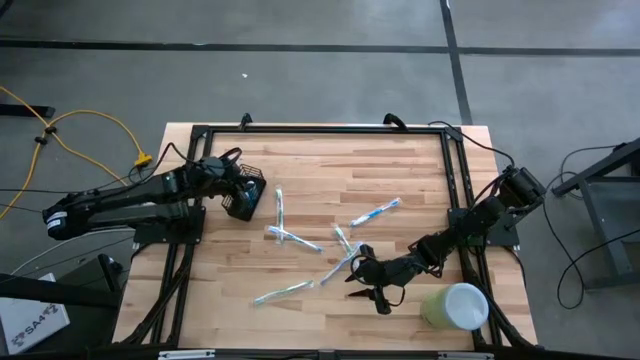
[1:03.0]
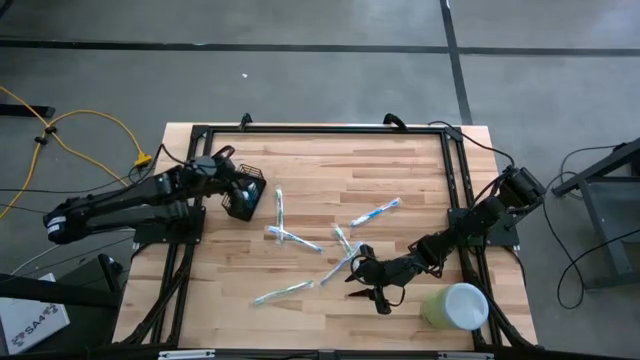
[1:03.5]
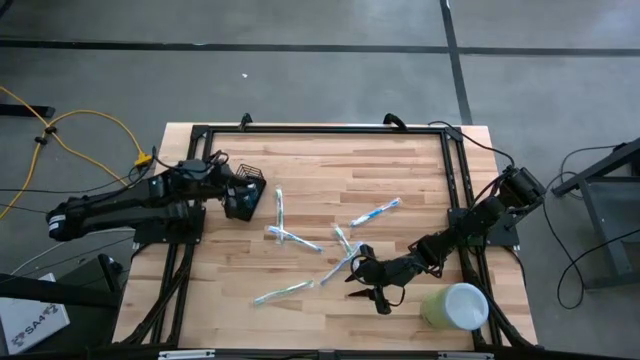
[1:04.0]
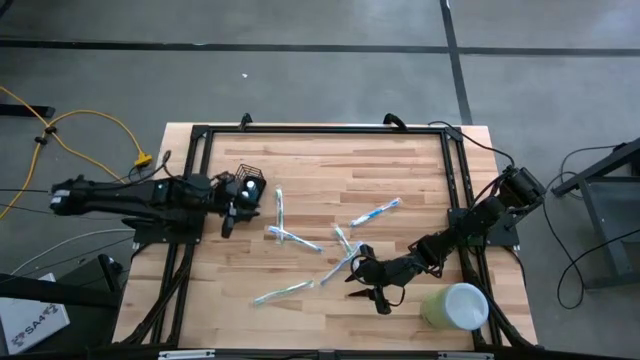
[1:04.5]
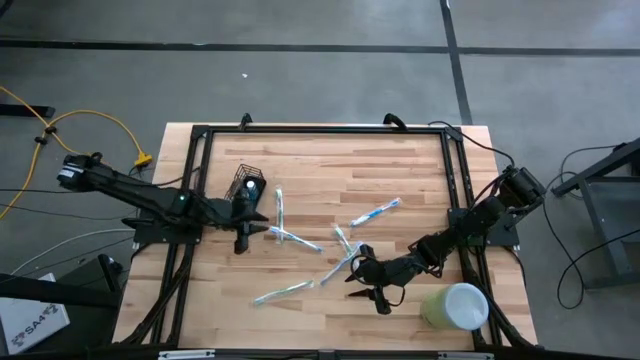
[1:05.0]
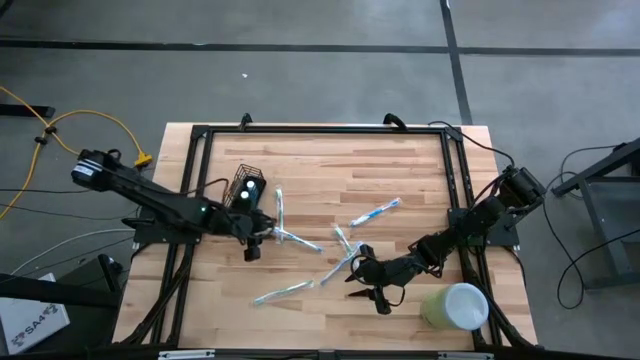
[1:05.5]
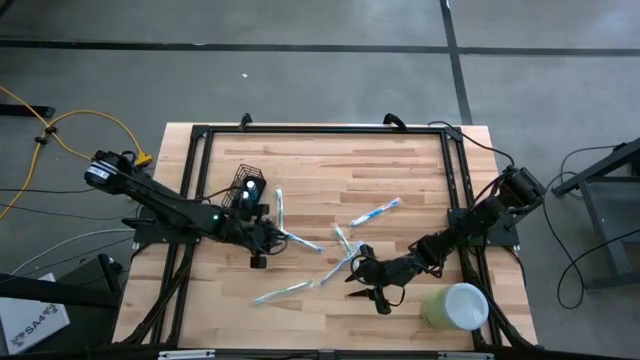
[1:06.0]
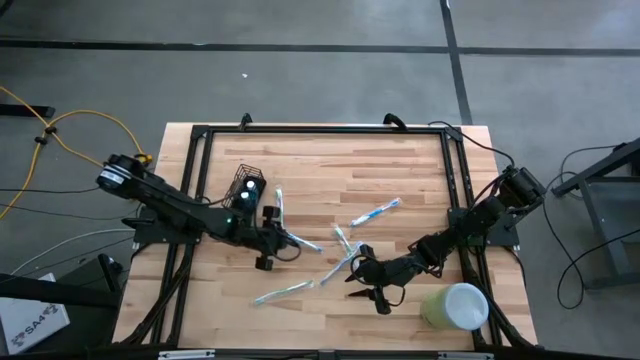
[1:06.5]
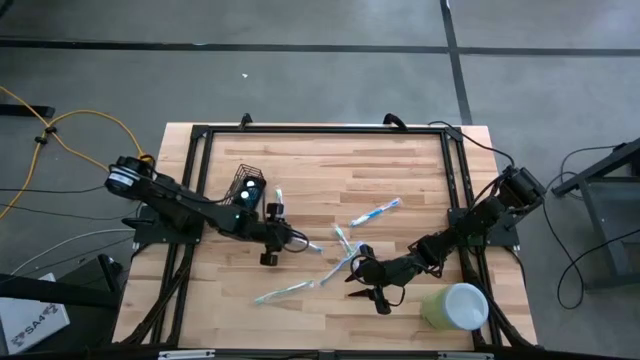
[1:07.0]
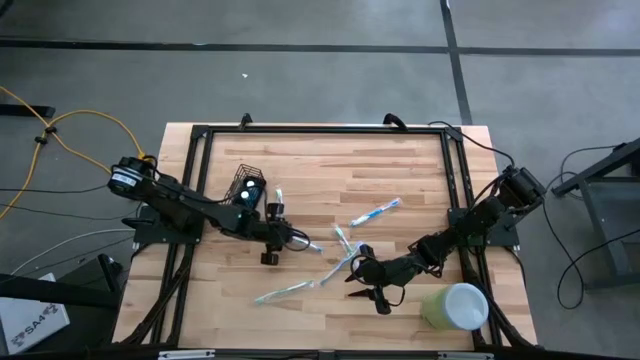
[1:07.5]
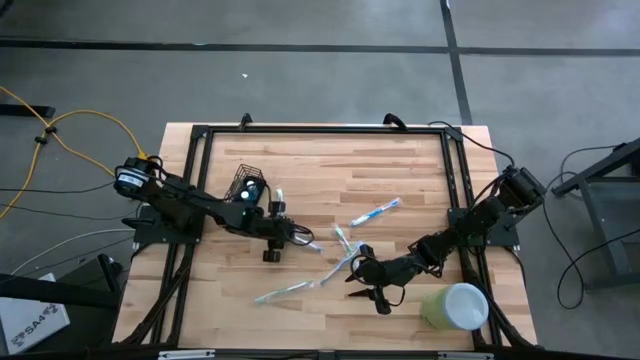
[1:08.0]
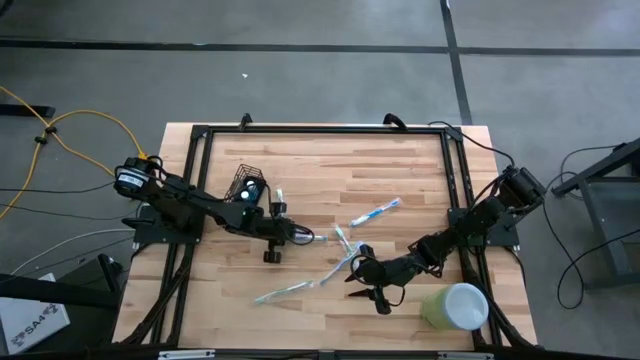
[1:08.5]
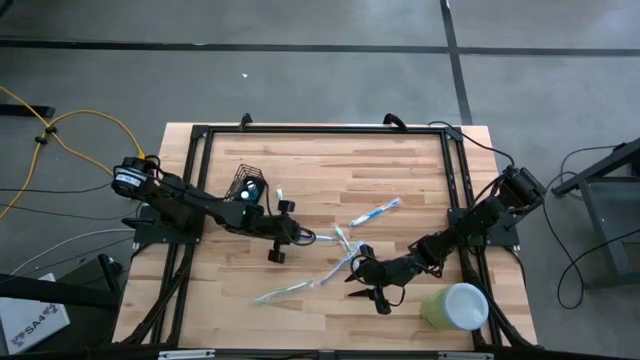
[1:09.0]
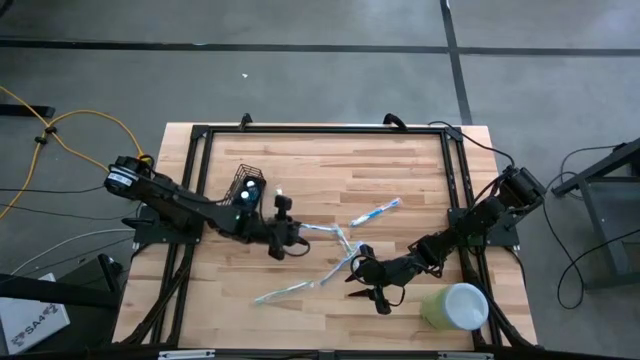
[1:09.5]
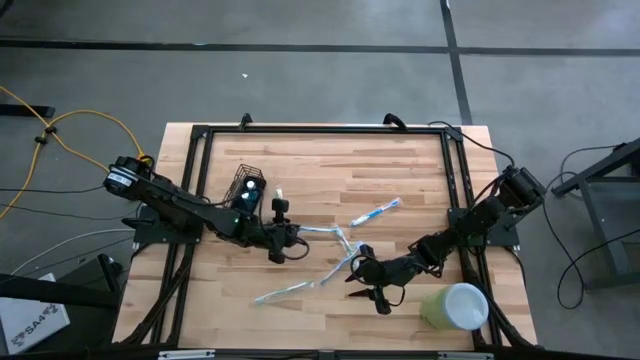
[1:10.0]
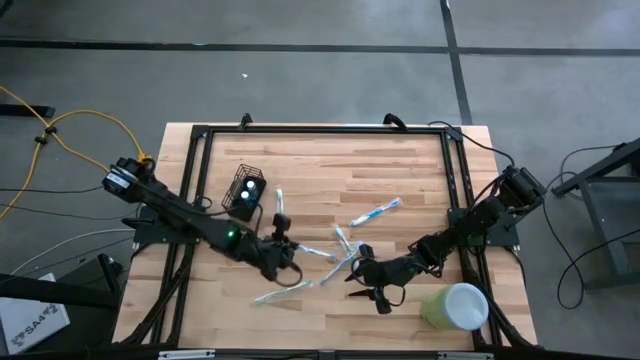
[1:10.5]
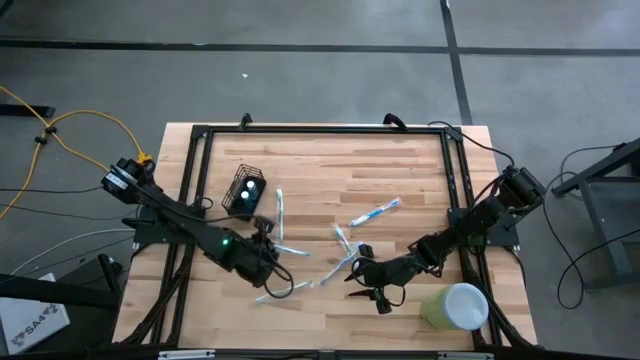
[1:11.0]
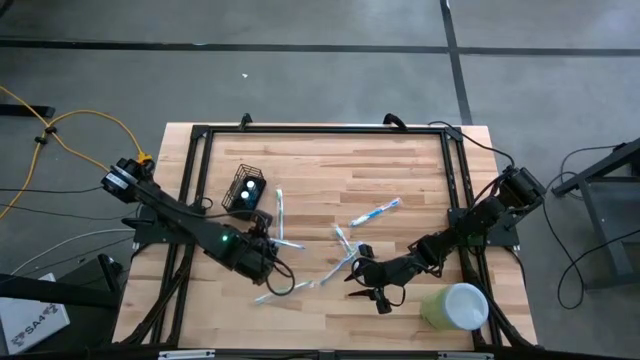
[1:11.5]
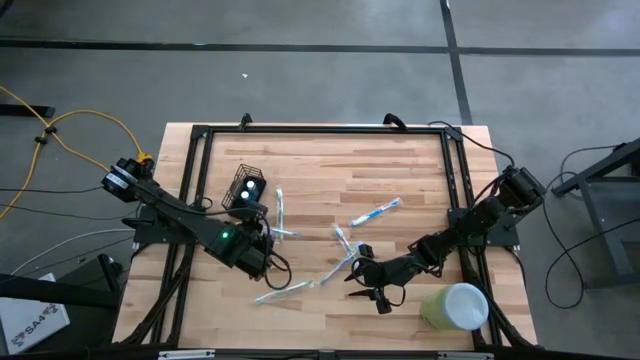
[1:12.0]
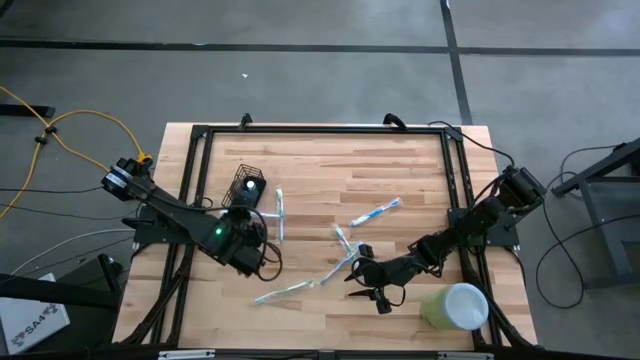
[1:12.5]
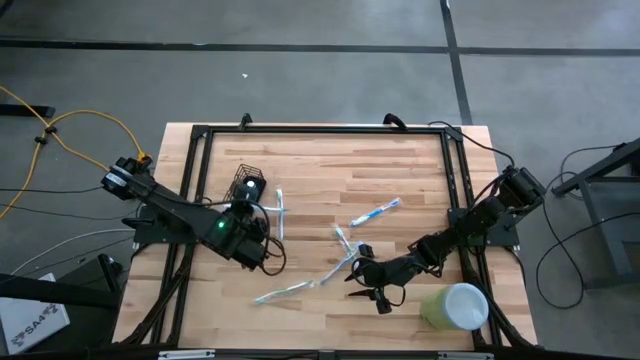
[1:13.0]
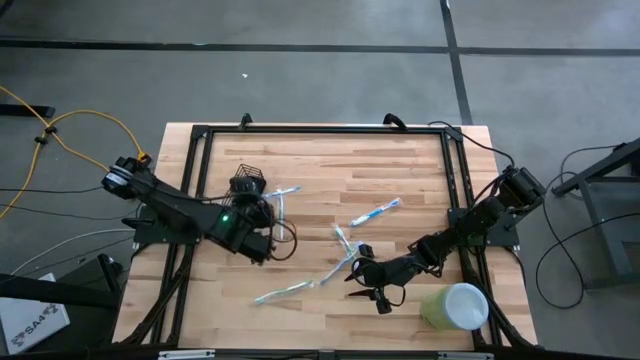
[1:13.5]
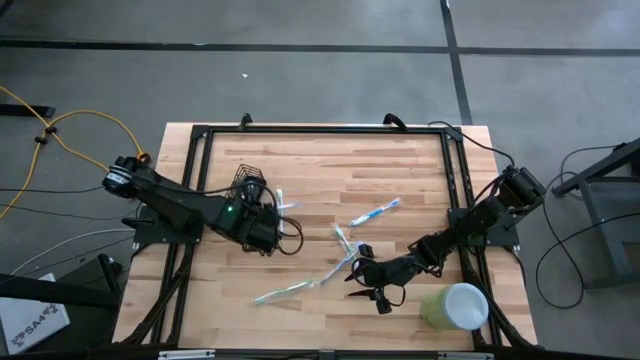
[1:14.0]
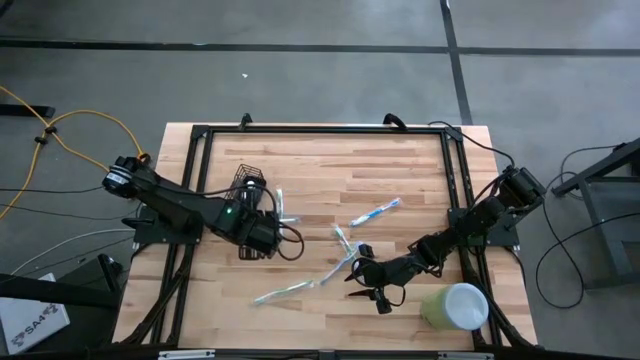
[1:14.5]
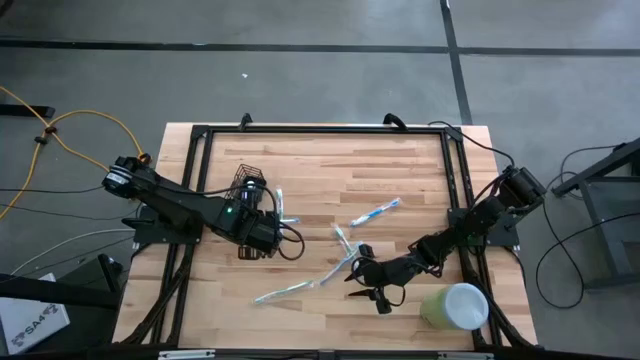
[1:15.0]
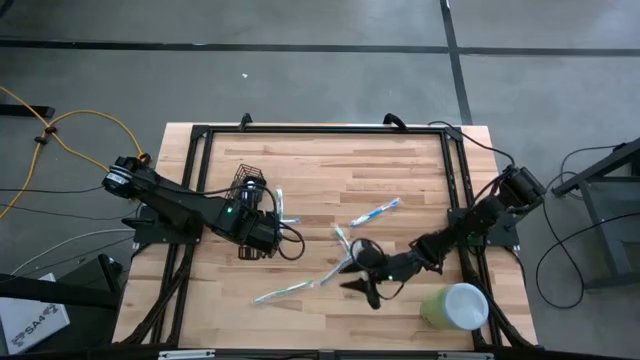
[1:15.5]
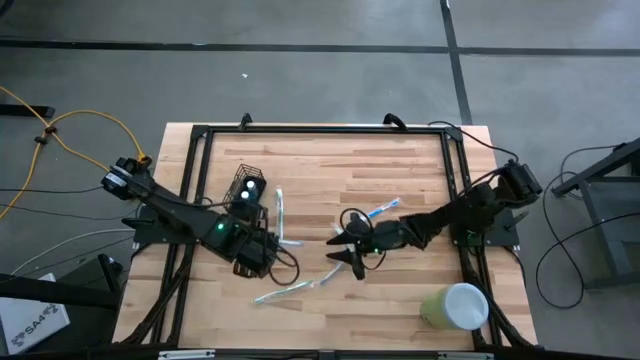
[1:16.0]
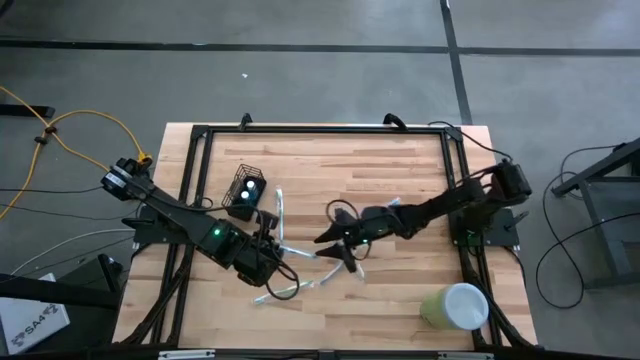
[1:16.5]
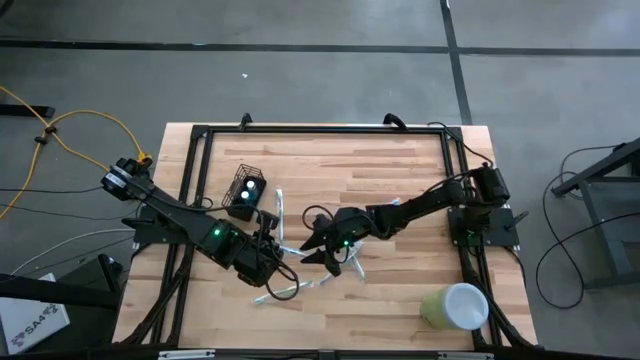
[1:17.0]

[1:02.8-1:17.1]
Task: Pick & Place toothbrushing station
Put the left blue toothbrush into the black wire organizer

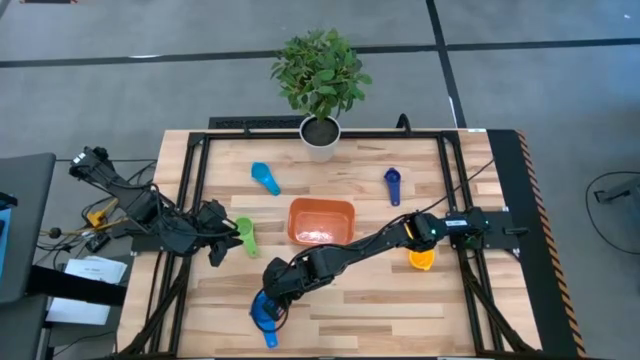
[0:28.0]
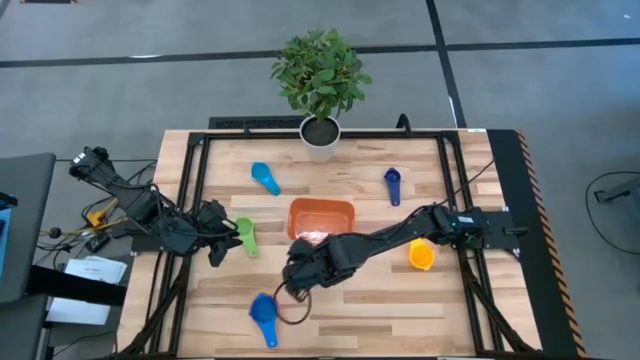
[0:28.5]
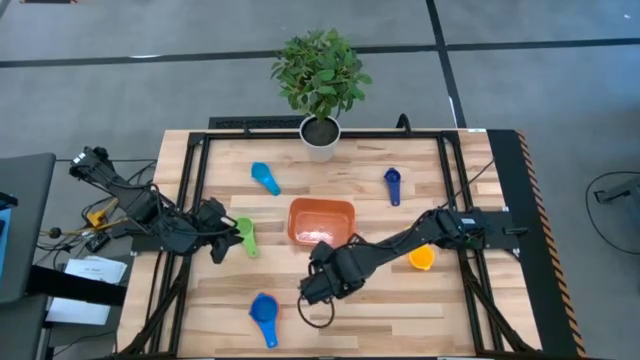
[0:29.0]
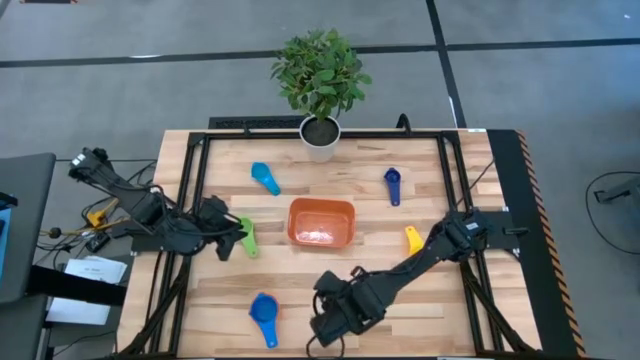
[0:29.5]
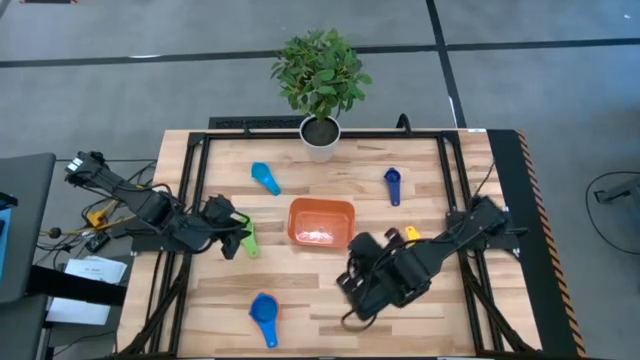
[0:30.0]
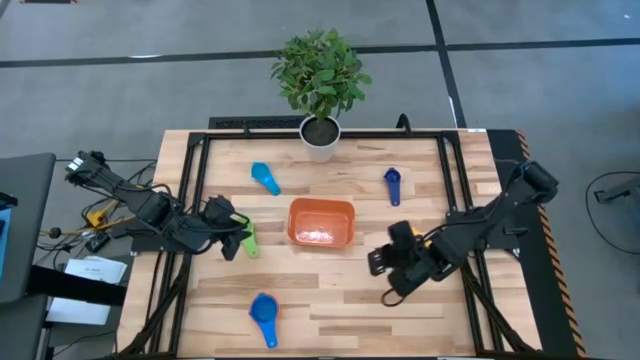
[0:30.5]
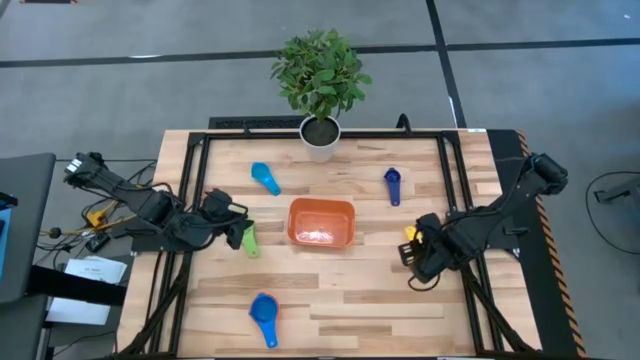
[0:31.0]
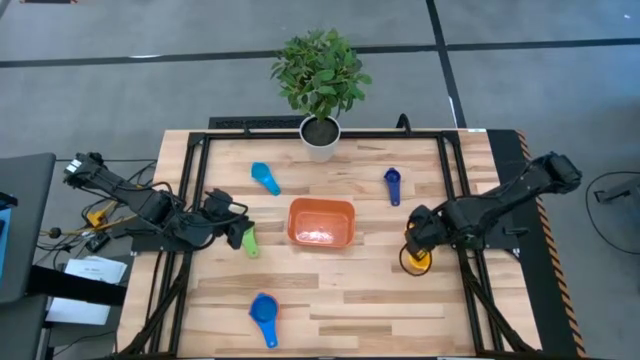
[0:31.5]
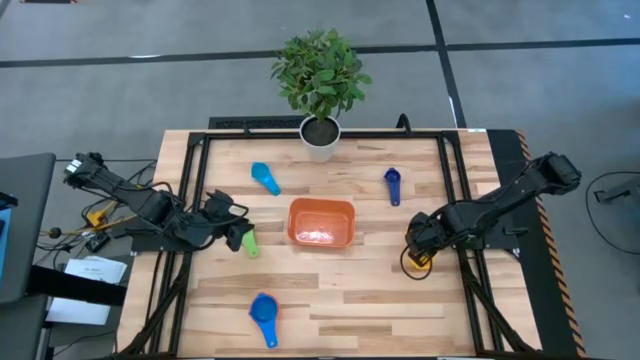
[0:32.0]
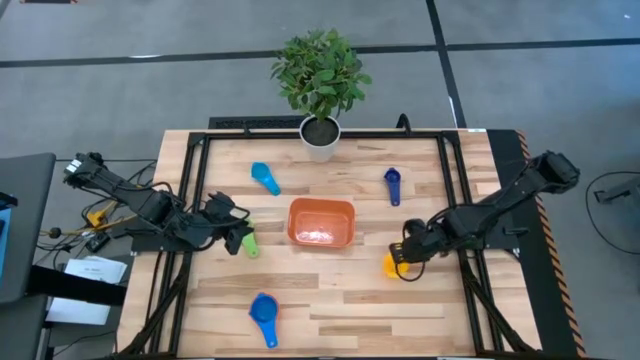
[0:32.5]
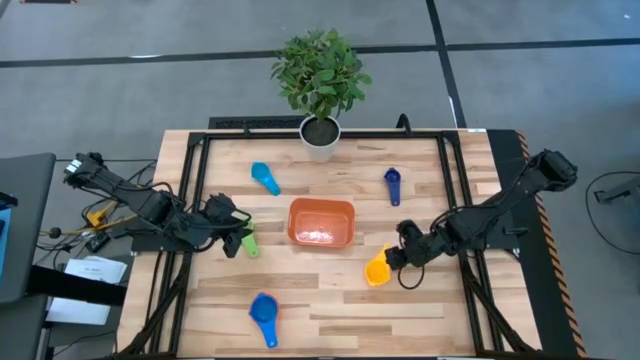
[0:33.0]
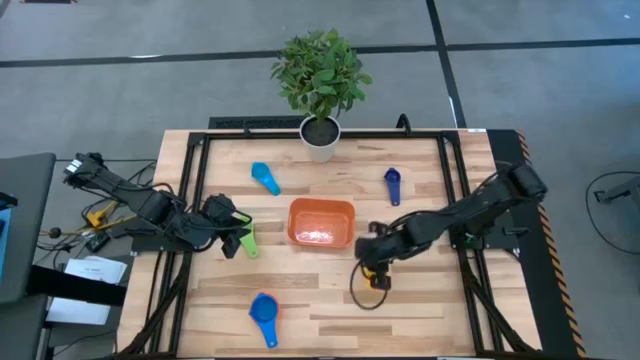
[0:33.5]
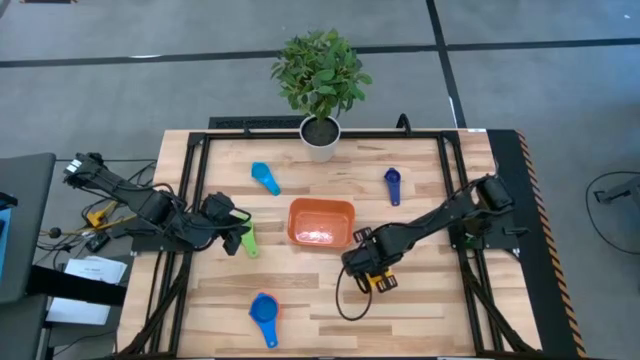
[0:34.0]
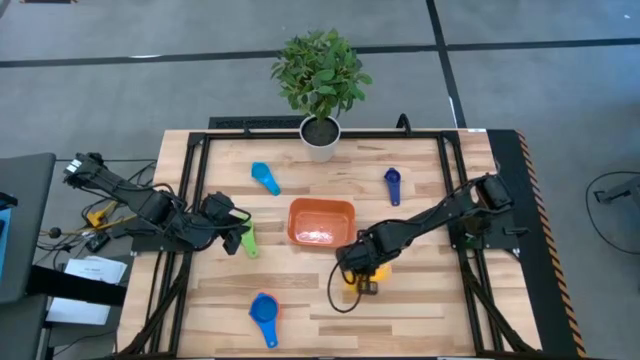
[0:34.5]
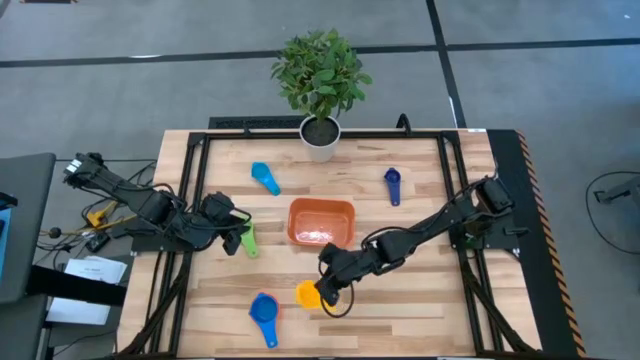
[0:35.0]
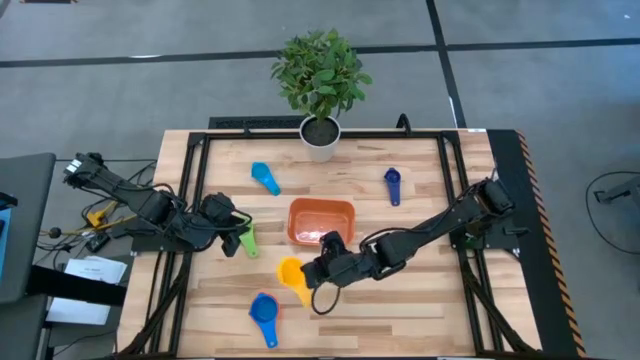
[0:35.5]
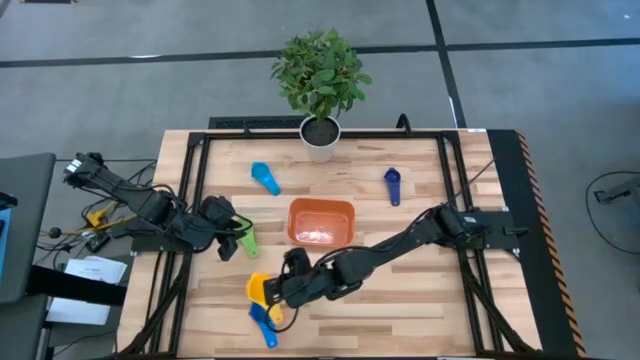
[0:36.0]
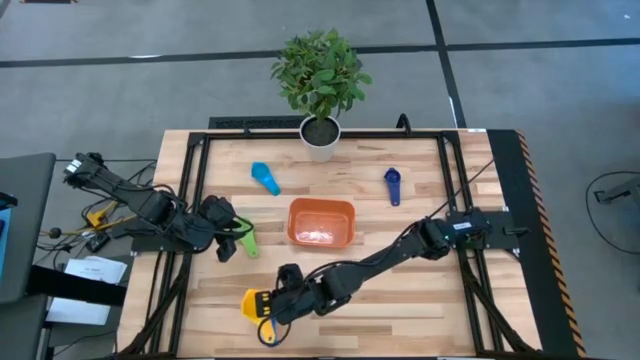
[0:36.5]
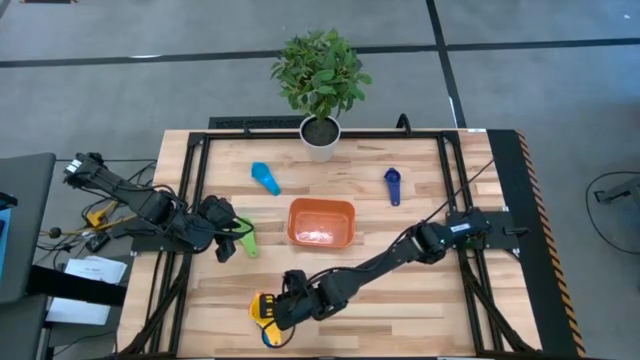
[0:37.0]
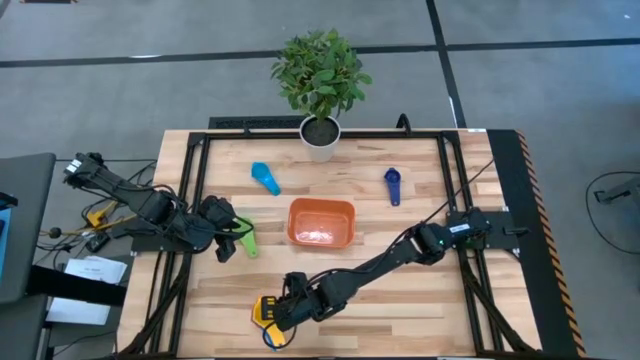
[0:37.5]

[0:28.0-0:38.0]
Task: Nest measuring cups in basket
Stack the yellow measuring cup on top of the blue measuring cup
